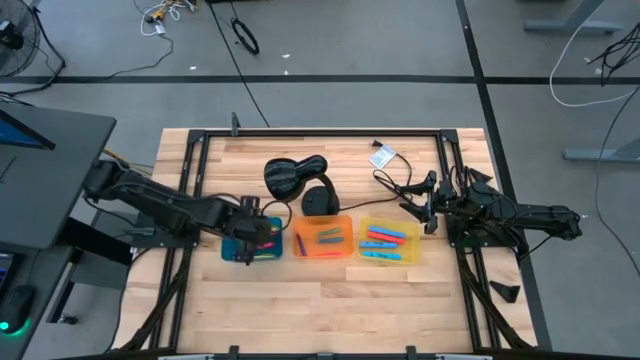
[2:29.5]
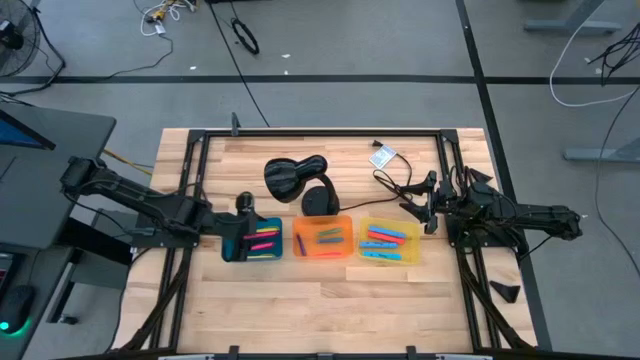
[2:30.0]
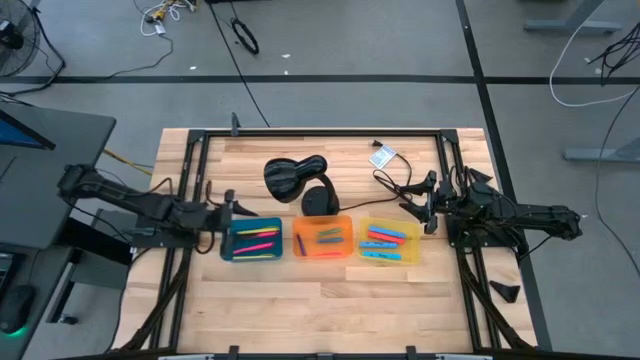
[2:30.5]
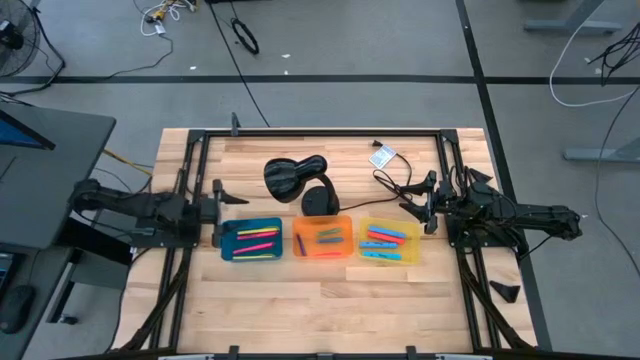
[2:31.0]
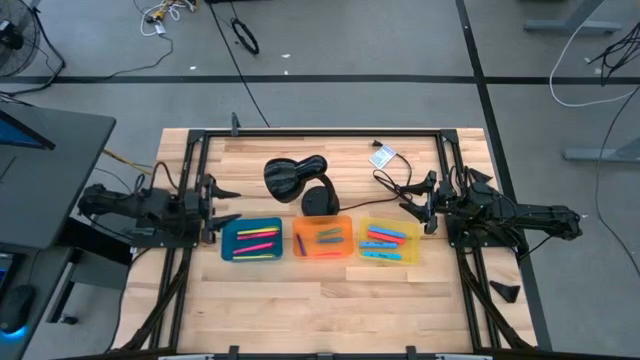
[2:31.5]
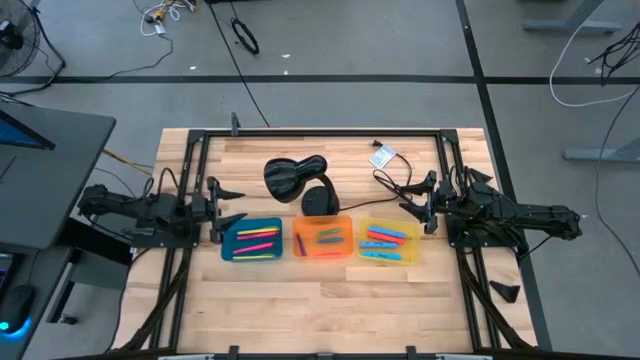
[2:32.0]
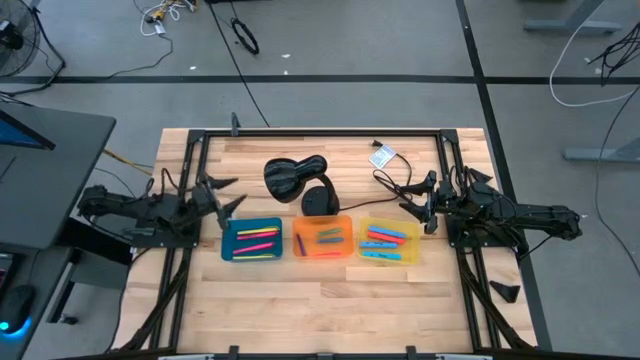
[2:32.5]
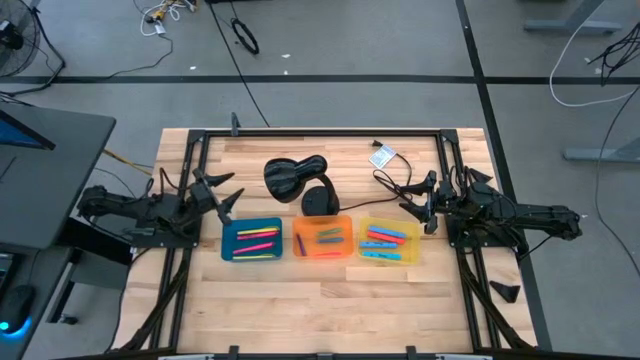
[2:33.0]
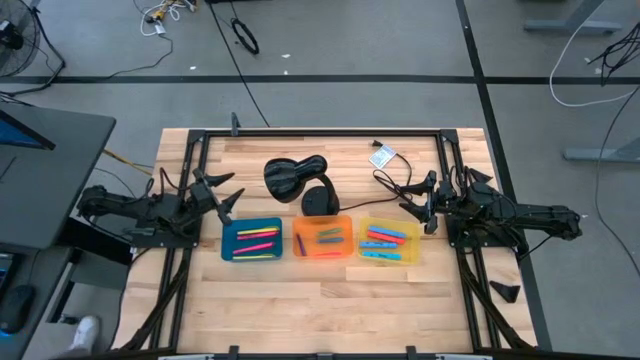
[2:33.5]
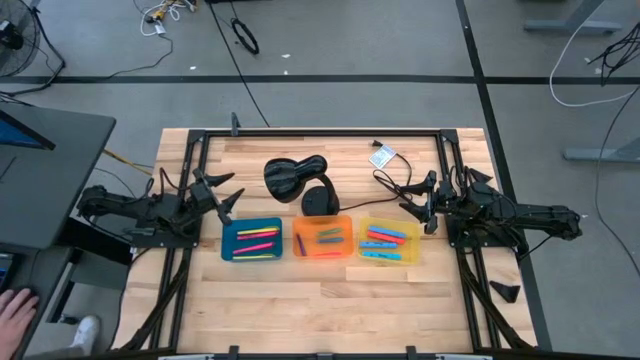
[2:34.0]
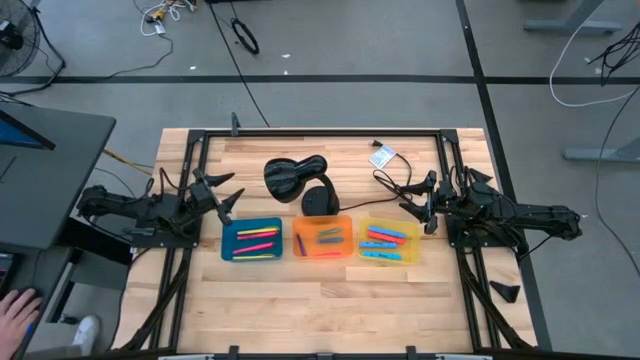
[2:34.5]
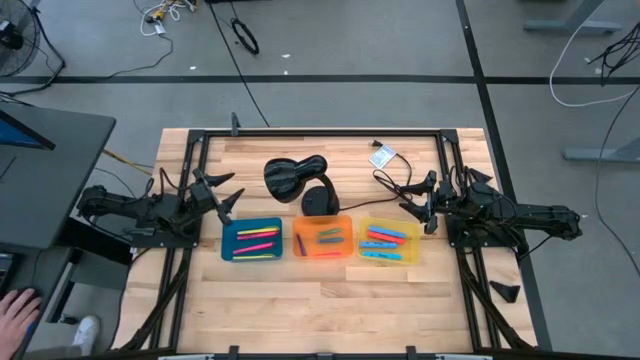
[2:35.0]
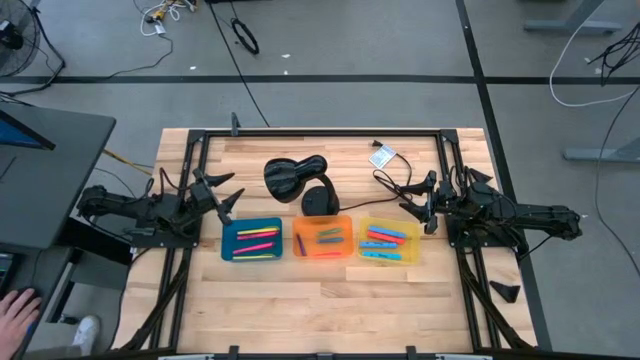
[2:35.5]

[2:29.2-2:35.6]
Task: Pick & Place Markers
Return to home position

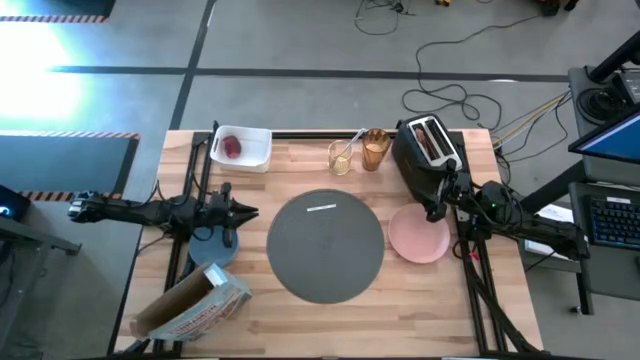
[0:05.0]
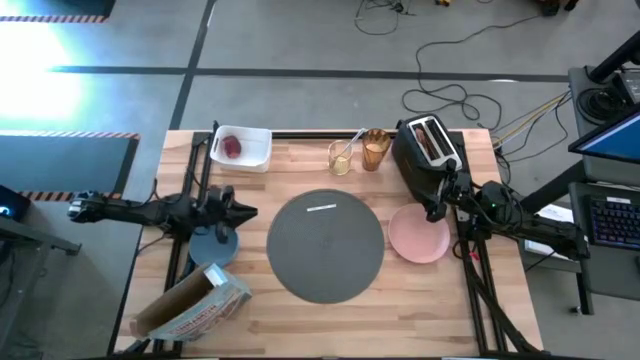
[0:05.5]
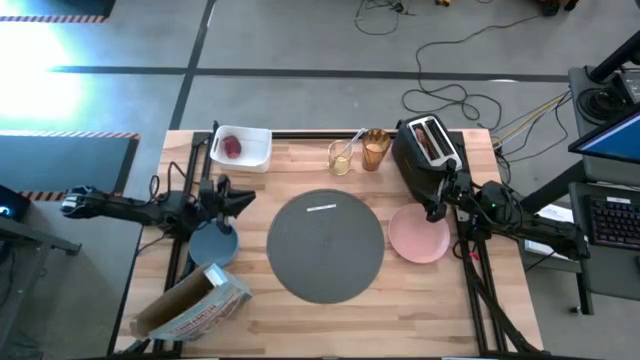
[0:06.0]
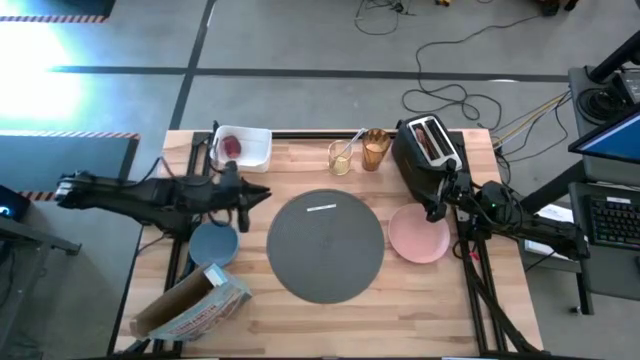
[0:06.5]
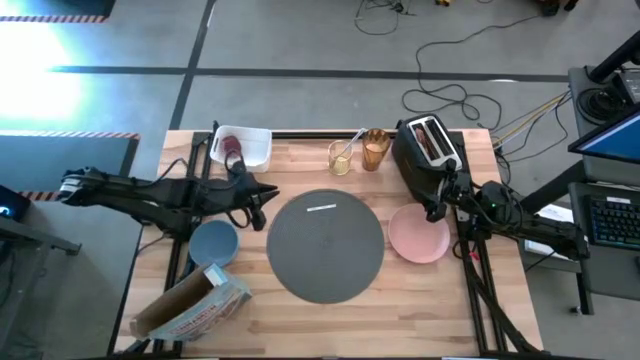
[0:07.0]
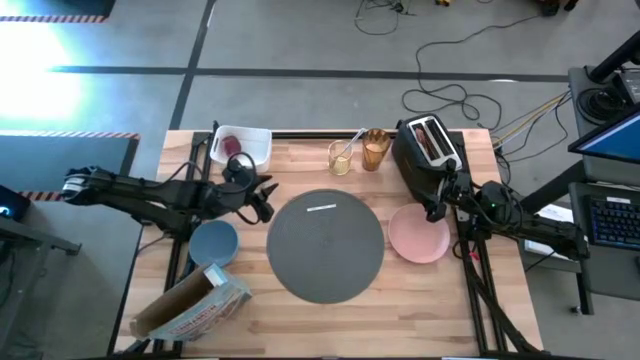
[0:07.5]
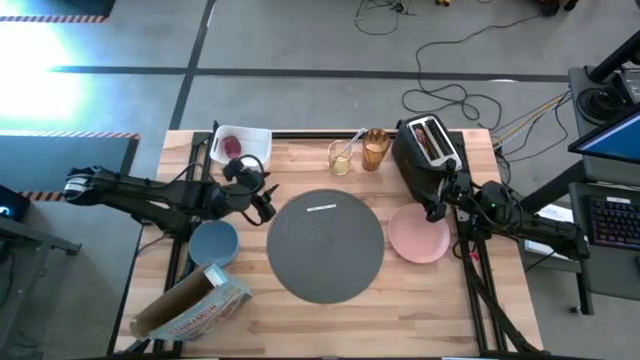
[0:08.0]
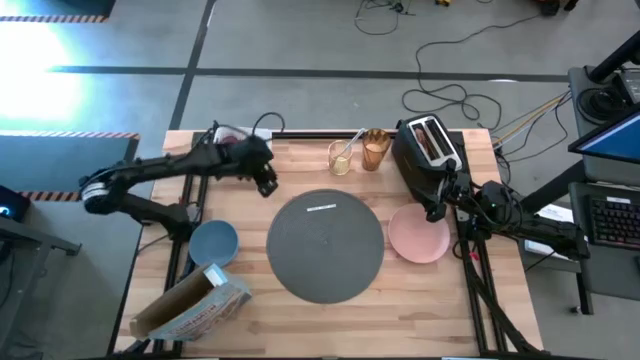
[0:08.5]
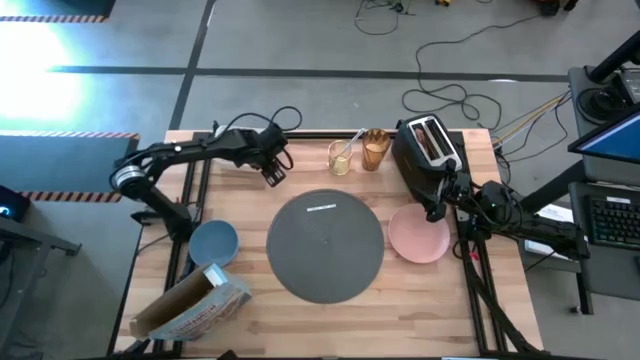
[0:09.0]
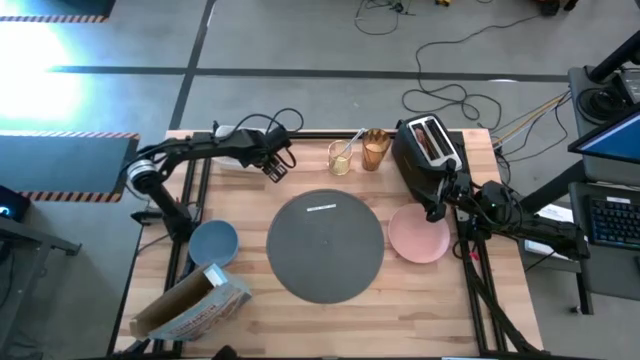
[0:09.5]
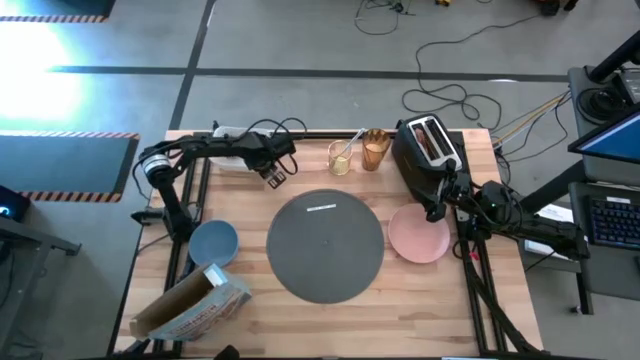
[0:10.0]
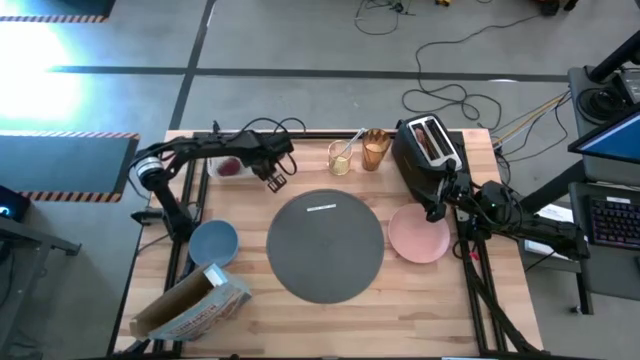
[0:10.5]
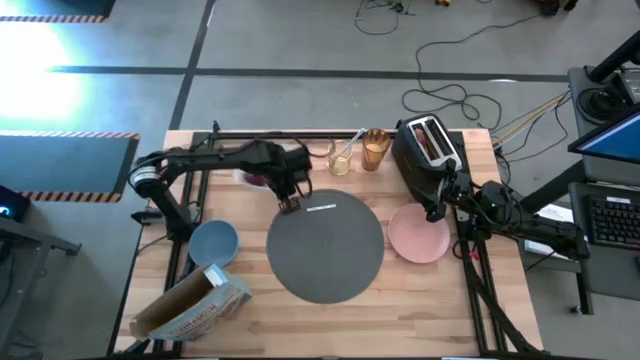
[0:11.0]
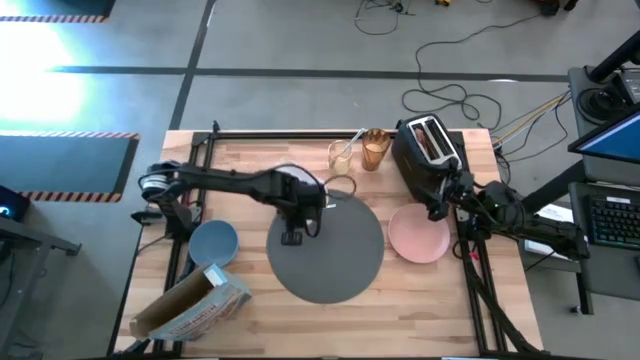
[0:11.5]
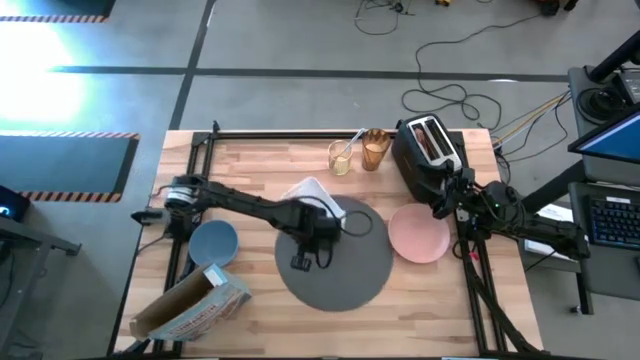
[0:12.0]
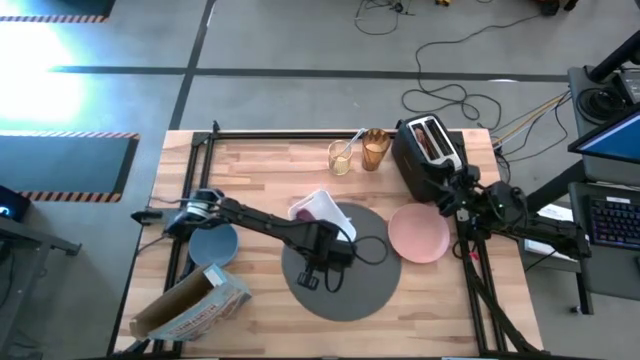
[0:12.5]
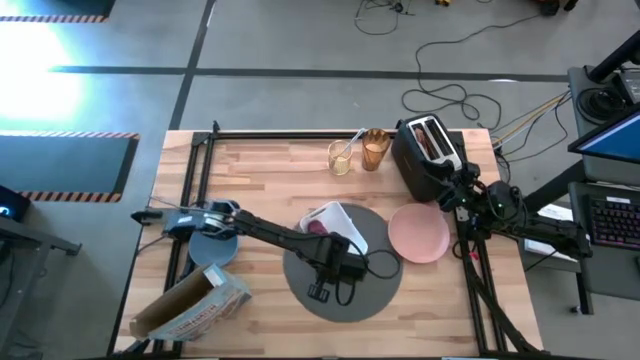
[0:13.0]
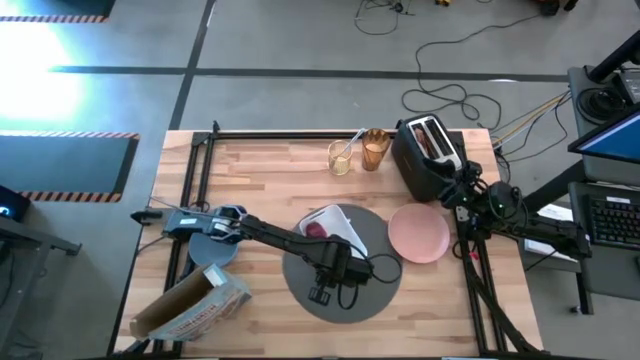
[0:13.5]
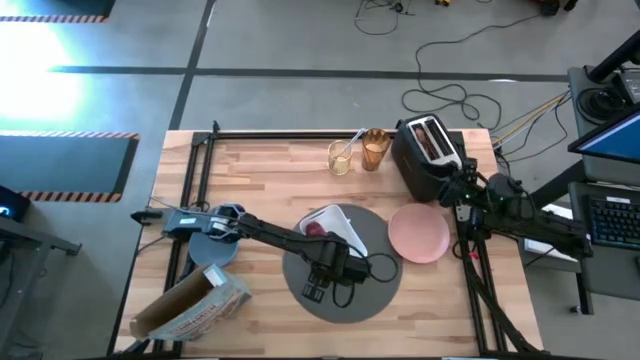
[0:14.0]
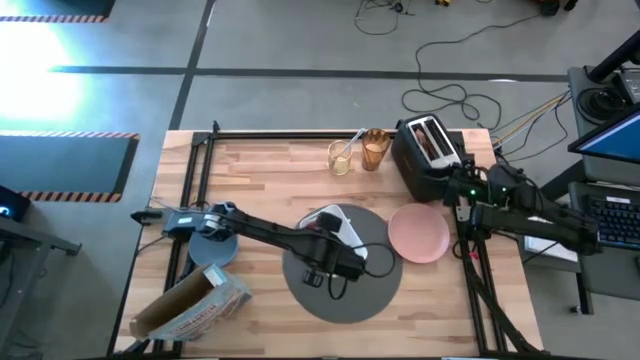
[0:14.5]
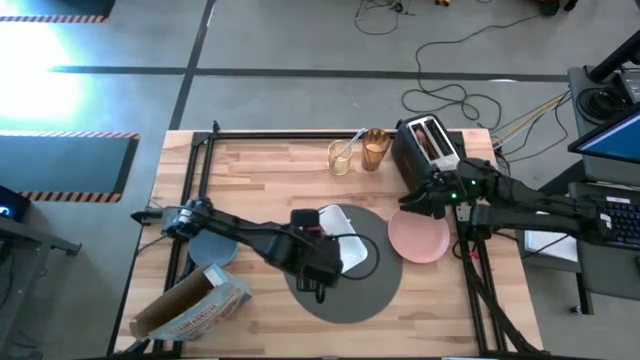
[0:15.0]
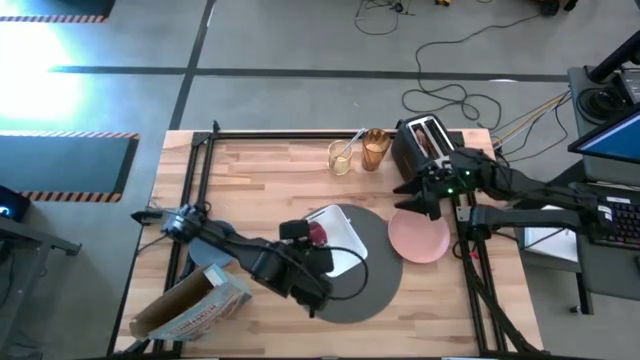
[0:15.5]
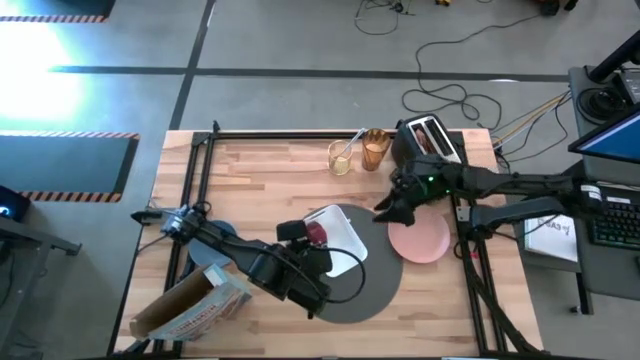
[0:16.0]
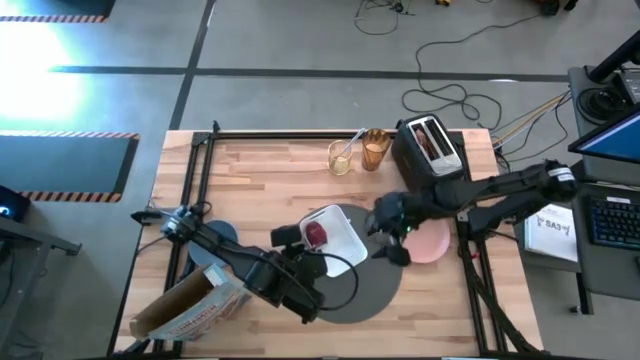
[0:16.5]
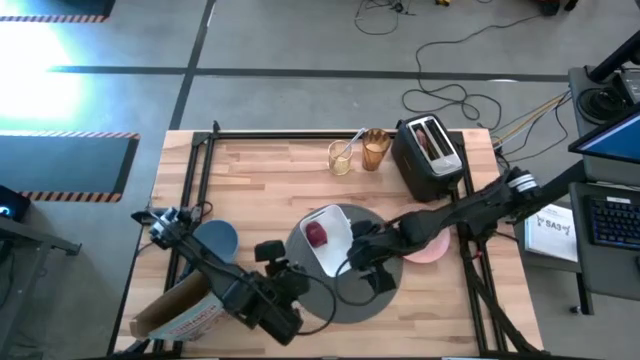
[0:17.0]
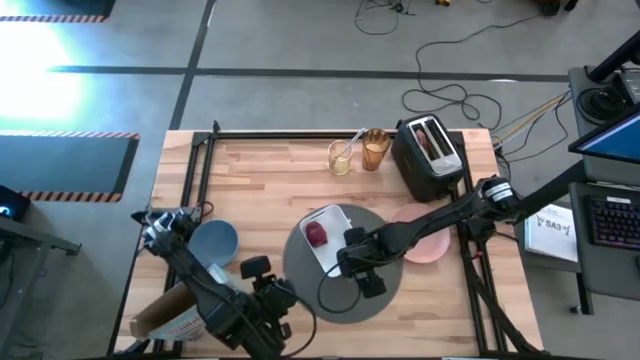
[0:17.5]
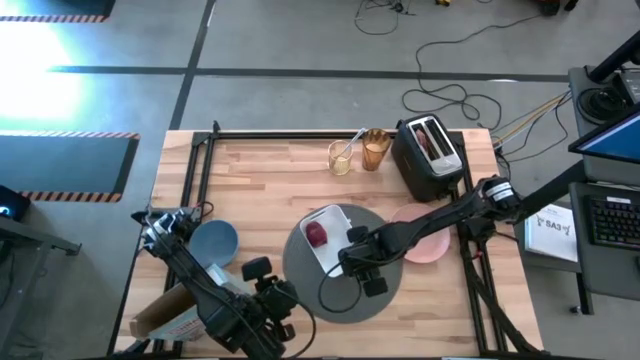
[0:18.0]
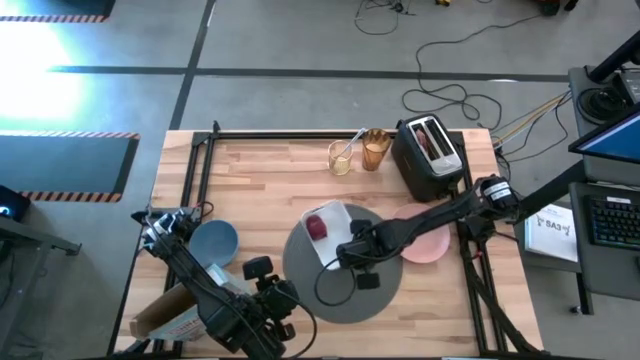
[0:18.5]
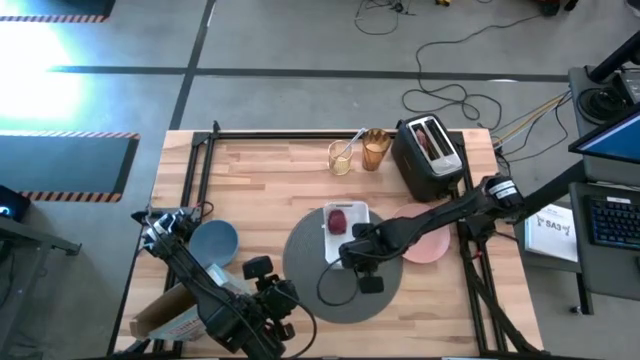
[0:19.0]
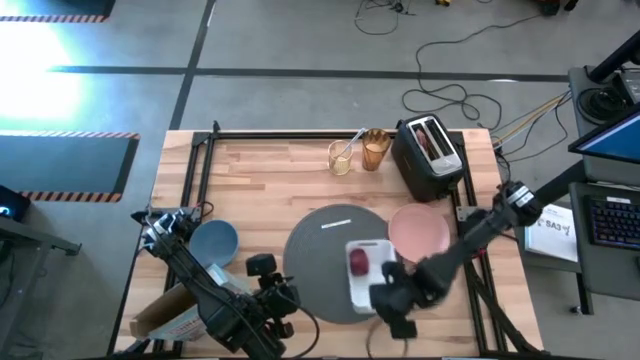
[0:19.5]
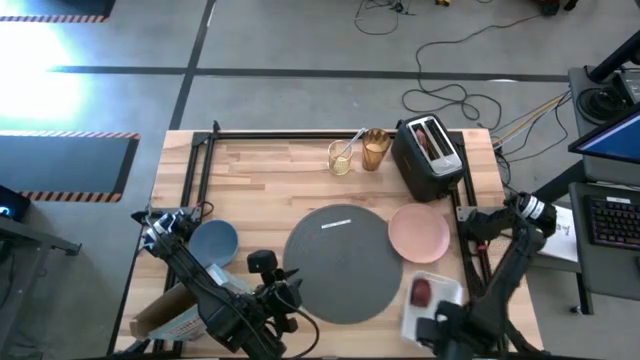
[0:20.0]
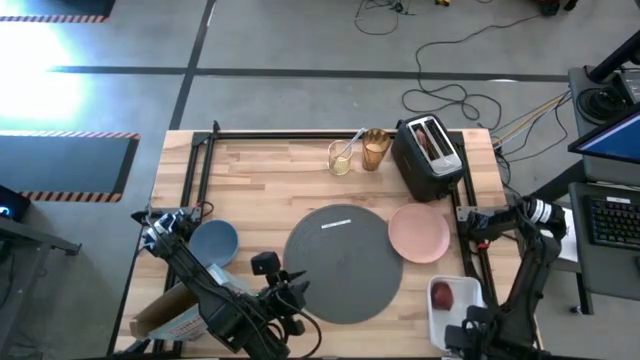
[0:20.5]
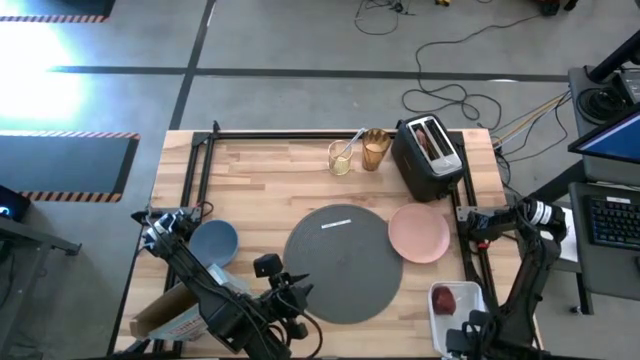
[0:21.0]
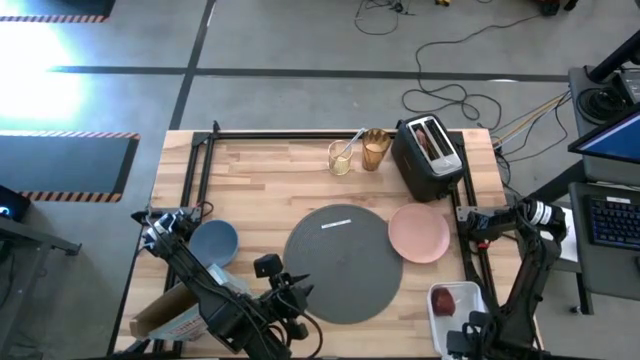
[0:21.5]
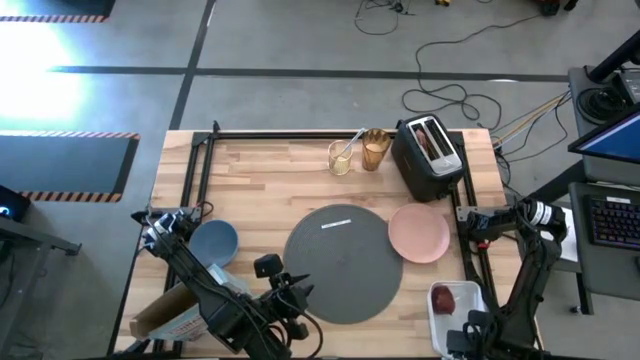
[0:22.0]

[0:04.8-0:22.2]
Task: Arrange a breakfast setting
Move the white bin with apple from top left to the bottom right of the table
